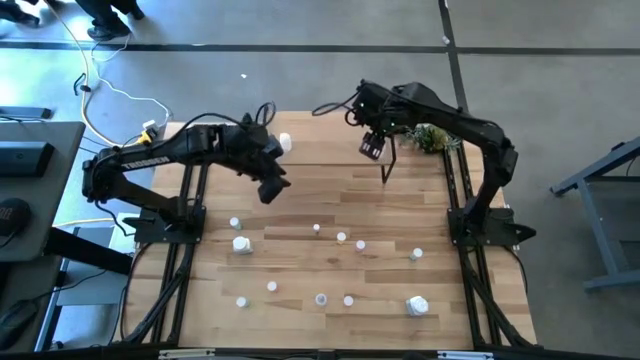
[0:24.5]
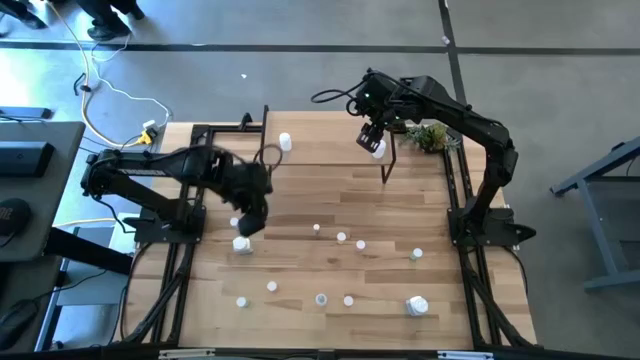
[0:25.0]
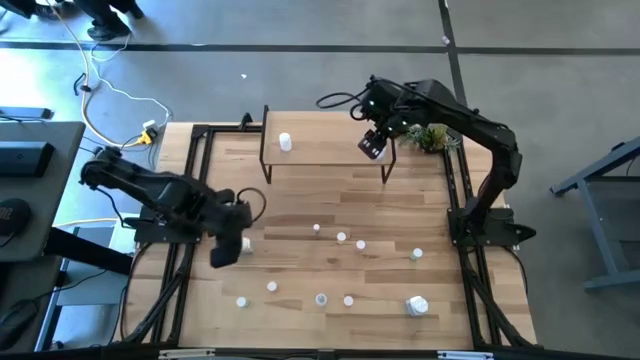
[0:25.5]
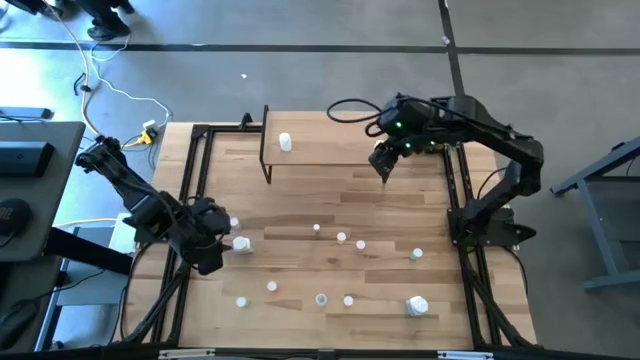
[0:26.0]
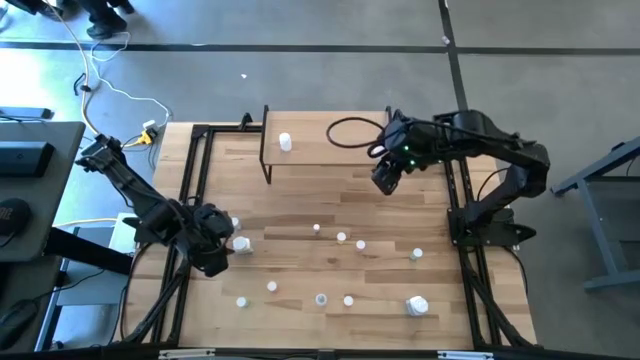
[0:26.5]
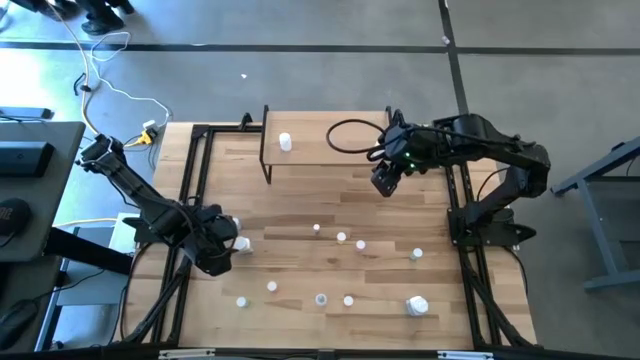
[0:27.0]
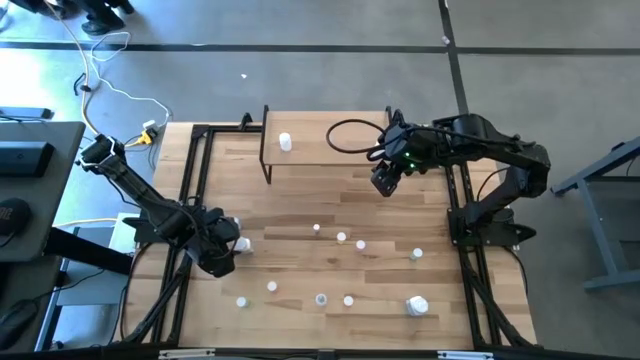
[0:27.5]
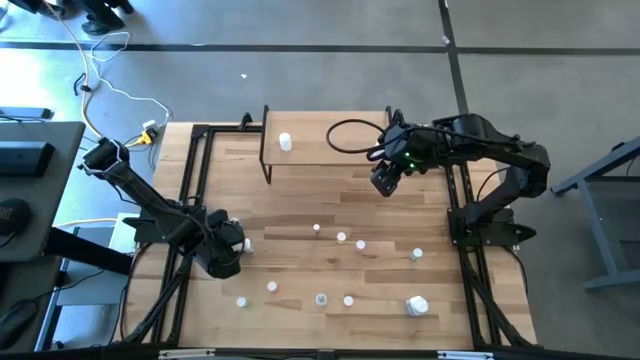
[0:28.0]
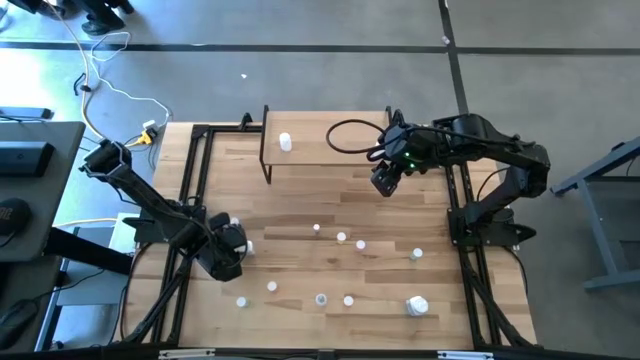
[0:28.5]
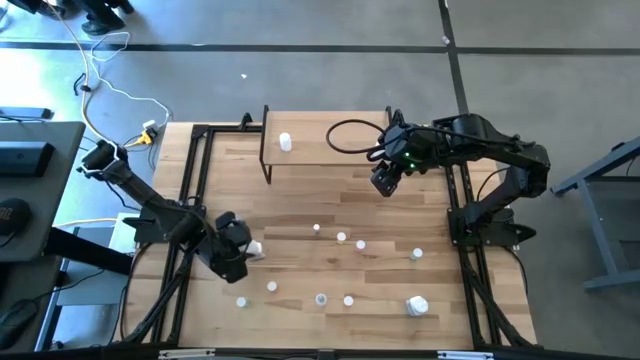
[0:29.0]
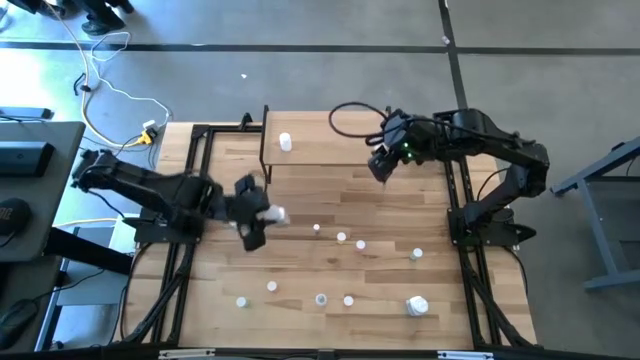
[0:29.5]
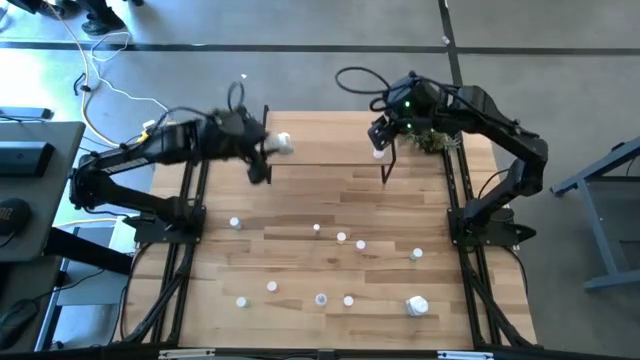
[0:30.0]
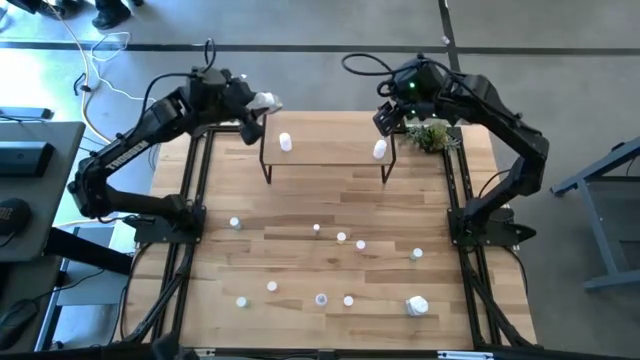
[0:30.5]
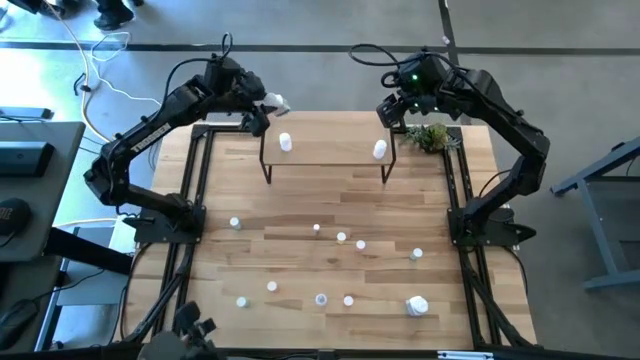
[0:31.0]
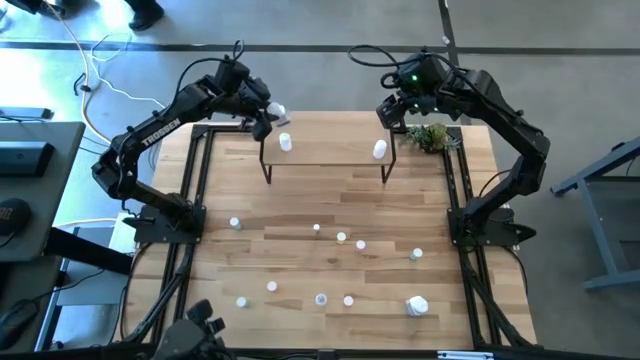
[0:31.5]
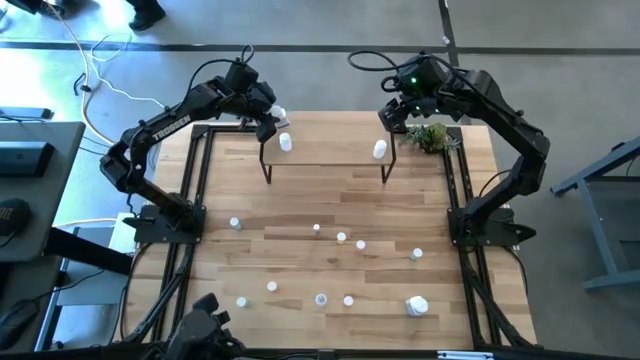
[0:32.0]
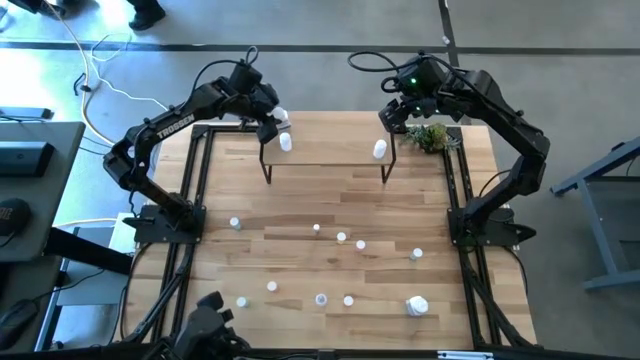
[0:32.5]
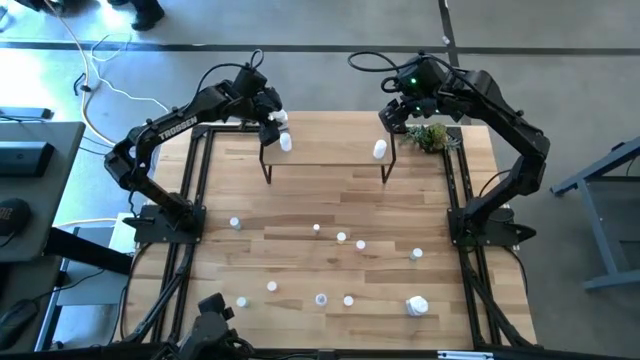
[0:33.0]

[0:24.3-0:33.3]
Task: Pick and place medicine bottles onto shelf by color
Put the white and blue pill bottle on the shelf

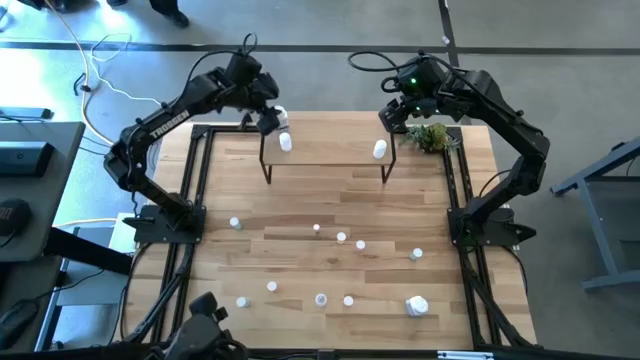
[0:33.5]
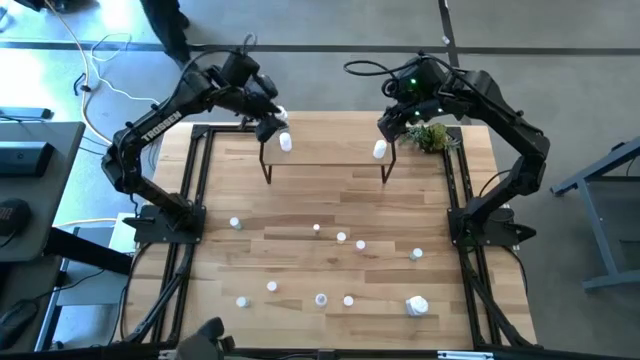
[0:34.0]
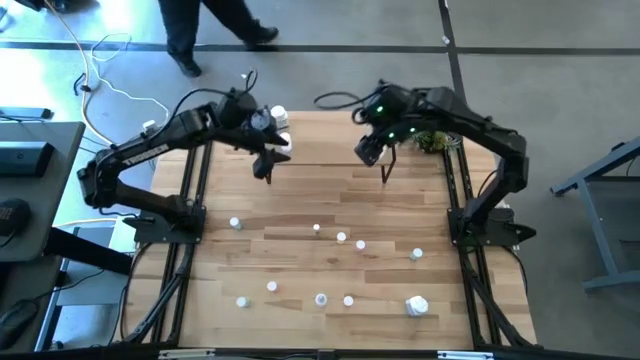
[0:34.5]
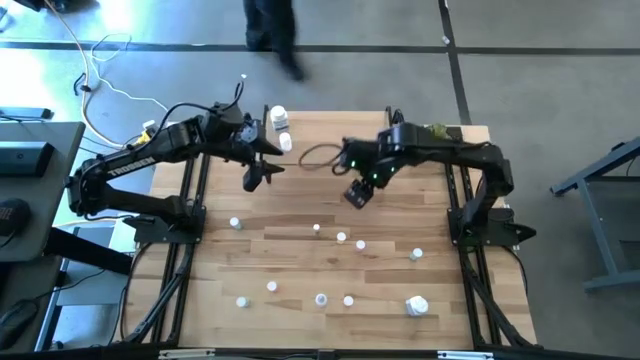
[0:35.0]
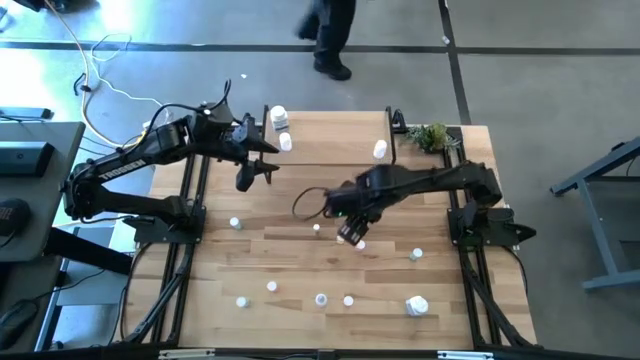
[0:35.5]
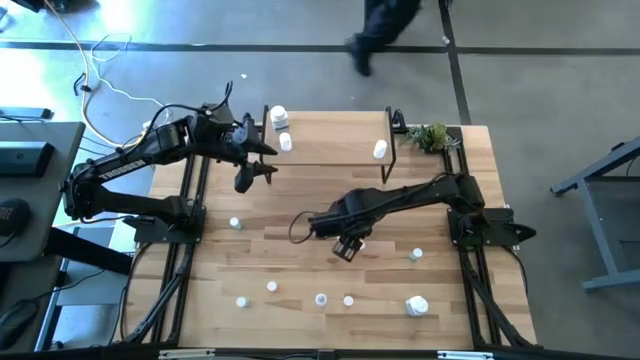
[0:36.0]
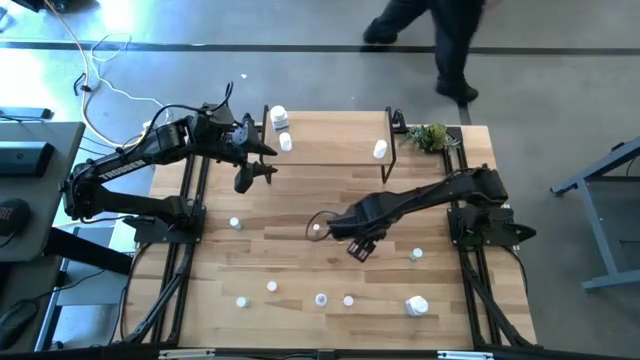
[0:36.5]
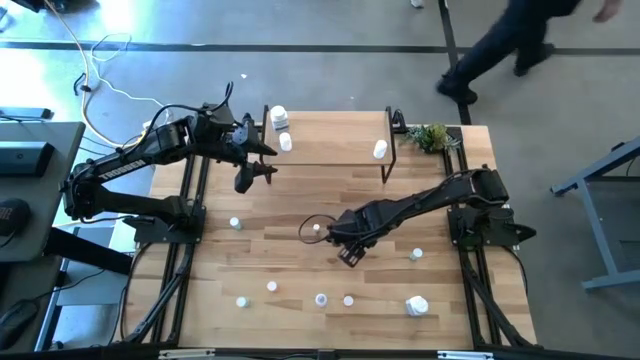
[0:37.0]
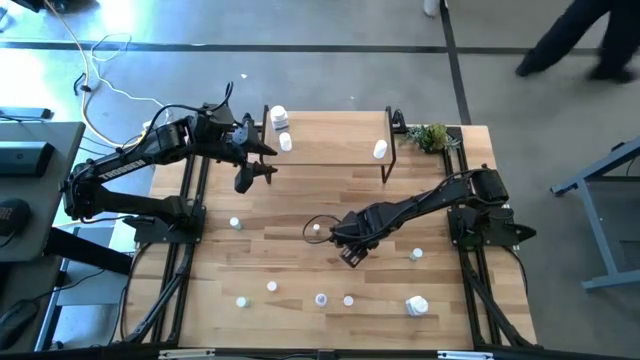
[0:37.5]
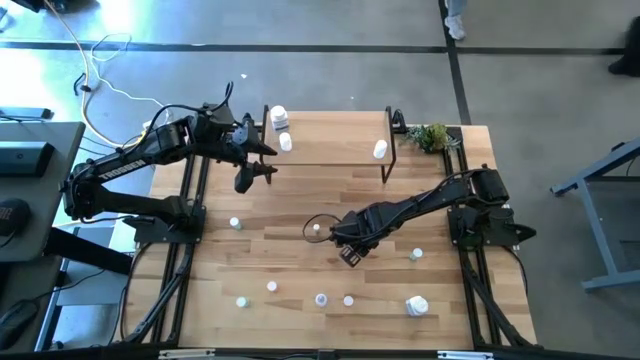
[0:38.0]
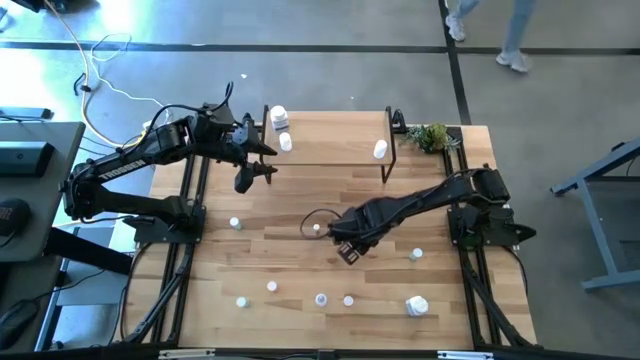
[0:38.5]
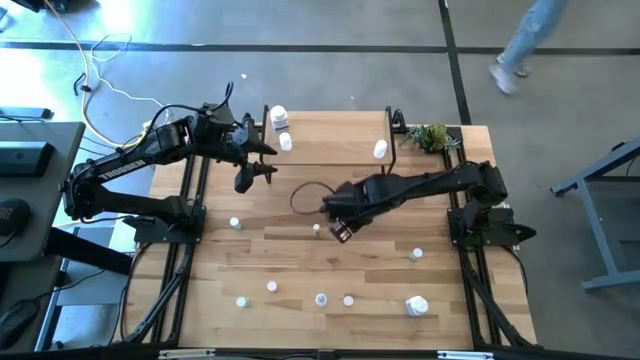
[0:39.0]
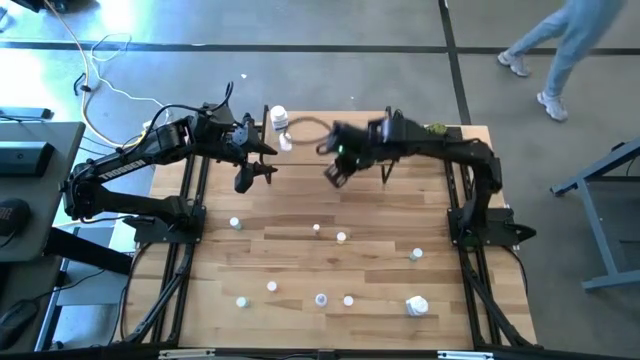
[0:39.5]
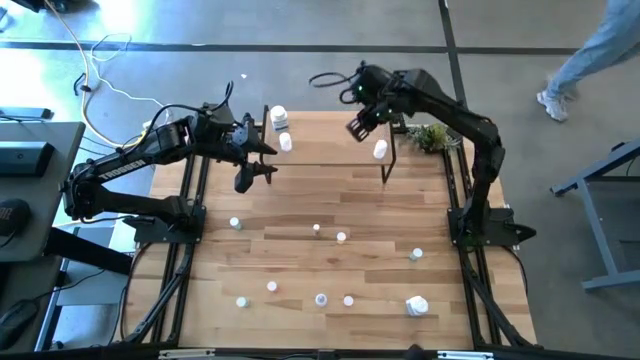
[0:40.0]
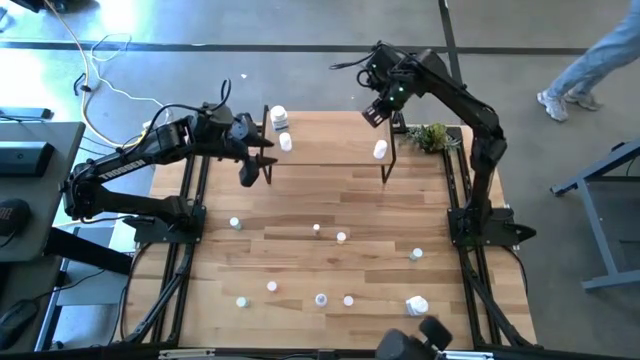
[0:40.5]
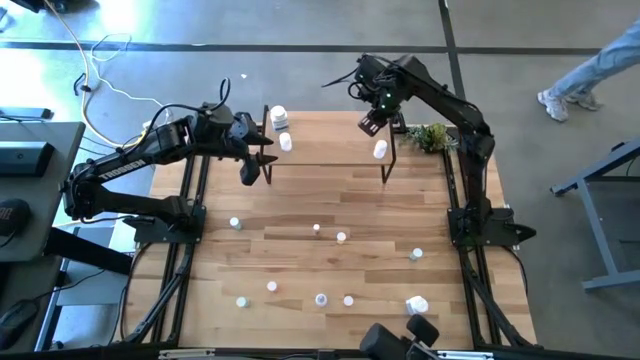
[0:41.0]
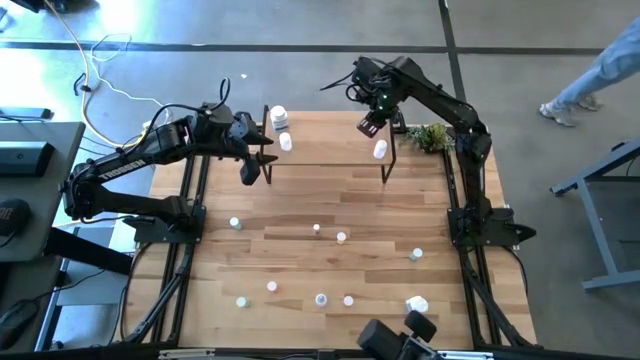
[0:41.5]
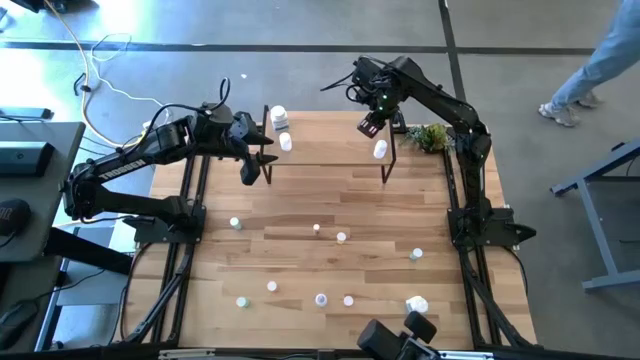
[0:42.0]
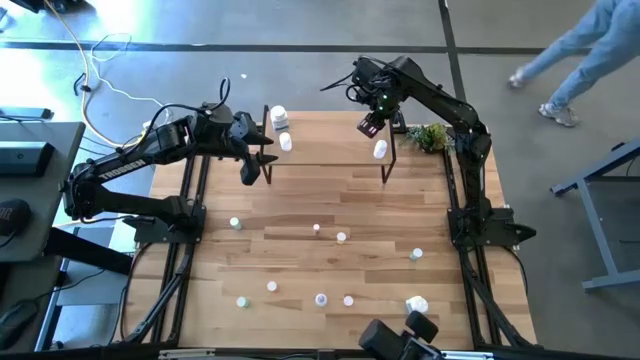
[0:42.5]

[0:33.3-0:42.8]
Put the purple pill bottle on the shelf

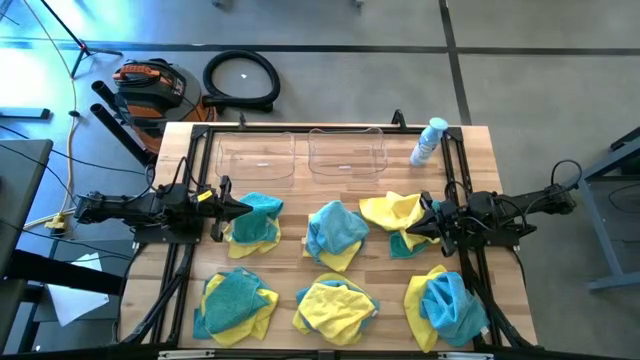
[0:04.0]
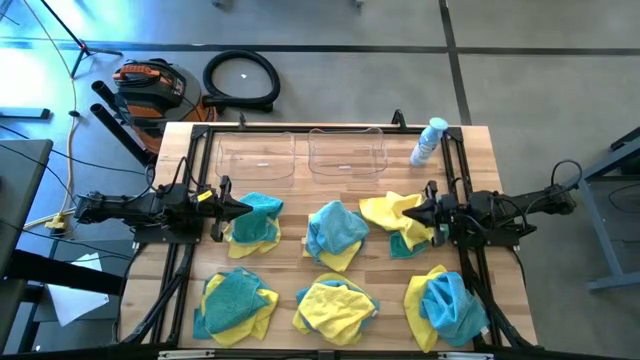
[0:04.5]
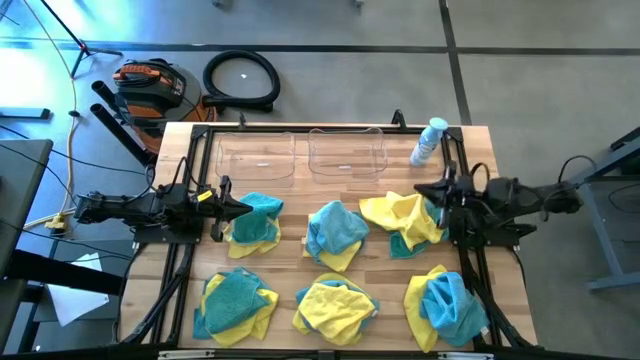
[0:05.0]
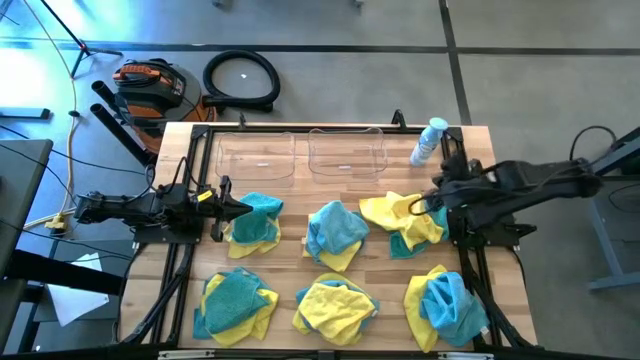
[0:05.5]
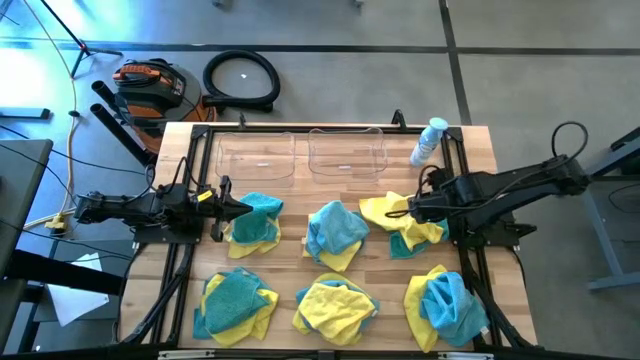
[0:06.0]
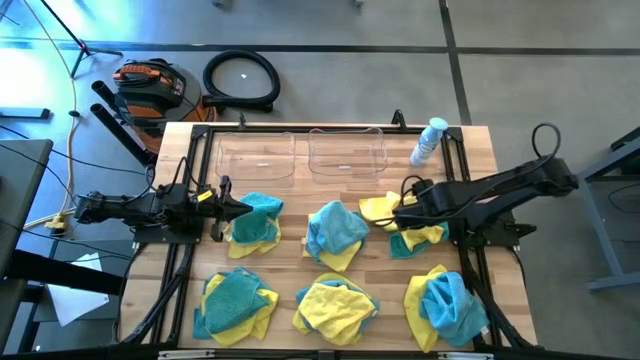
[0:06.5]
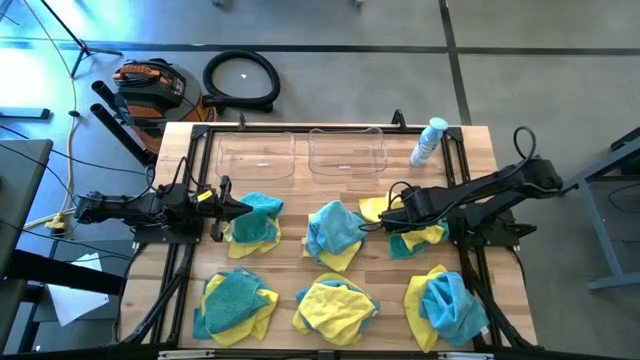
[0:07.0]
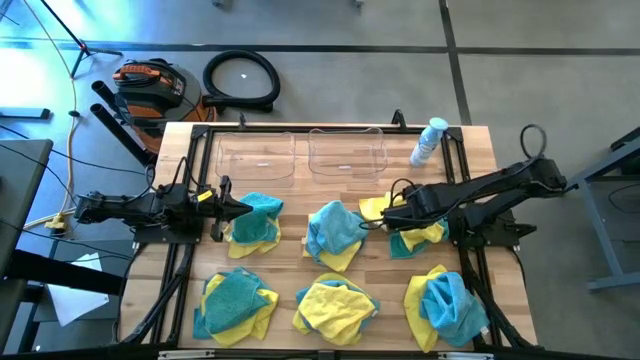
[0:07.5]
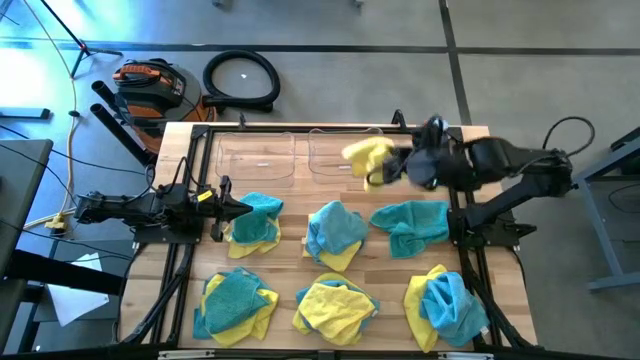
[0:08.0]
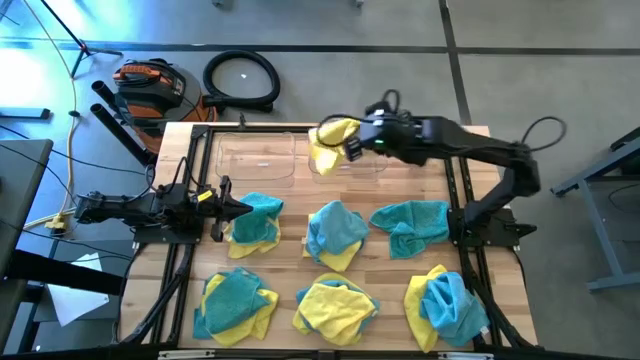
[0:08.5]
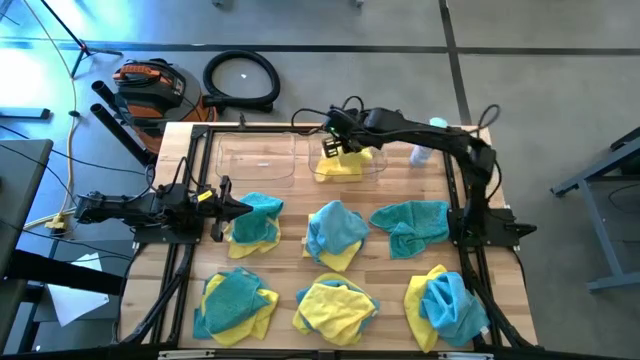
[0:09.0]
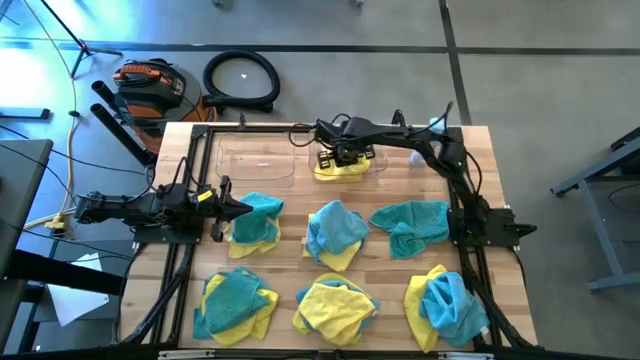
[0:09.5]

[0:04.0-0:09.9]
Task: Sort microfiber towel by color & place in baskets
Put the yellow towel into the right transparent bin
